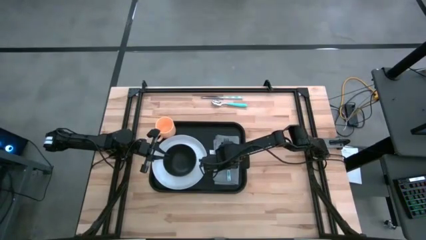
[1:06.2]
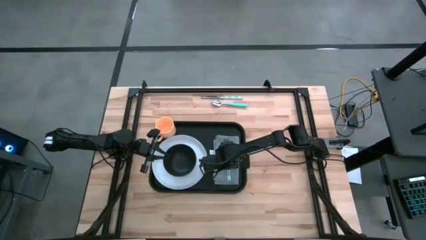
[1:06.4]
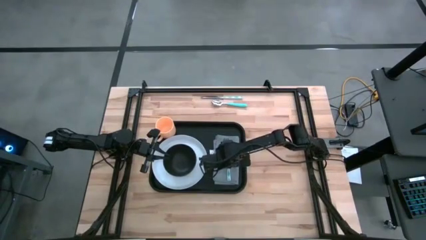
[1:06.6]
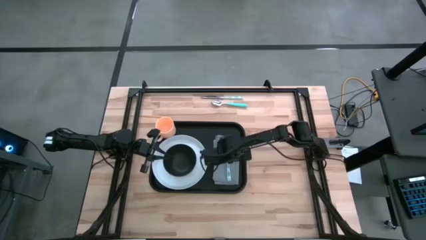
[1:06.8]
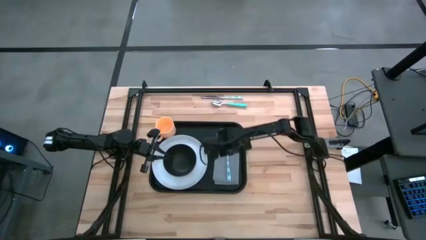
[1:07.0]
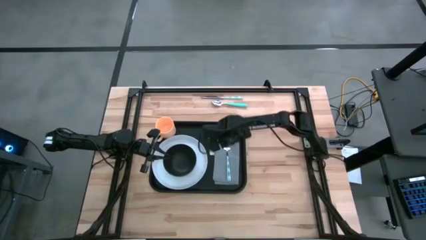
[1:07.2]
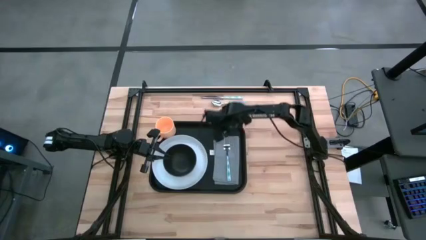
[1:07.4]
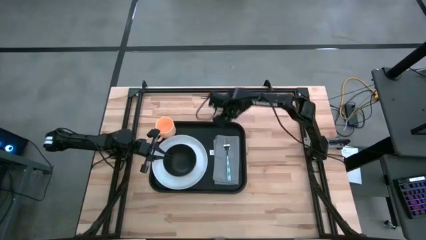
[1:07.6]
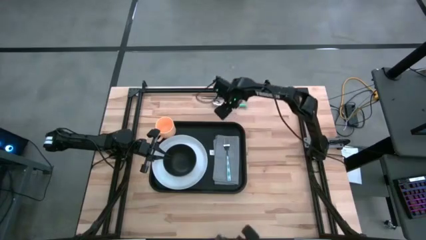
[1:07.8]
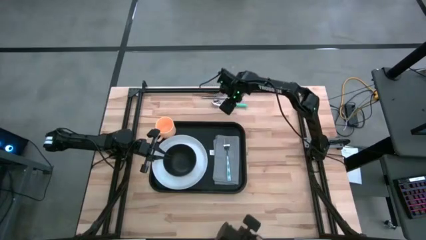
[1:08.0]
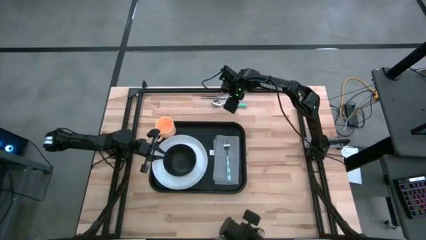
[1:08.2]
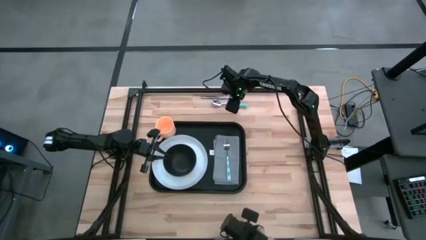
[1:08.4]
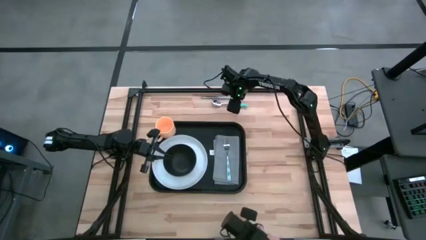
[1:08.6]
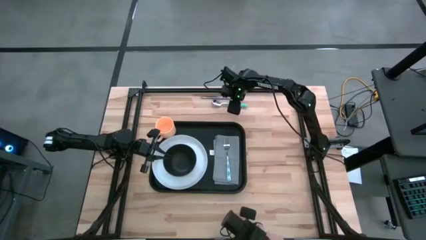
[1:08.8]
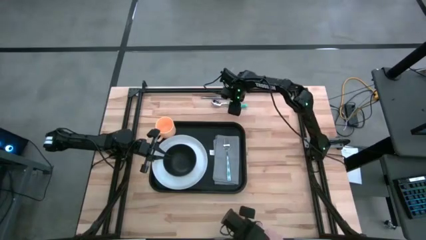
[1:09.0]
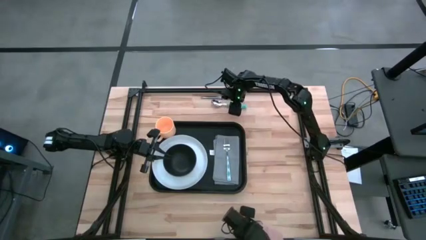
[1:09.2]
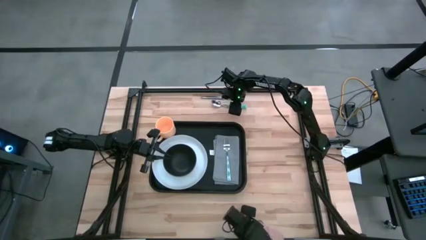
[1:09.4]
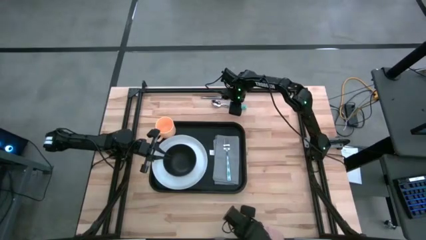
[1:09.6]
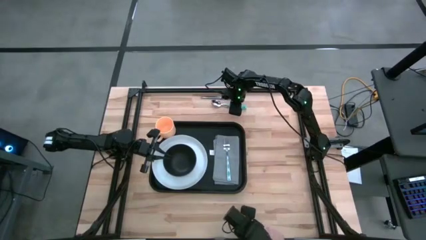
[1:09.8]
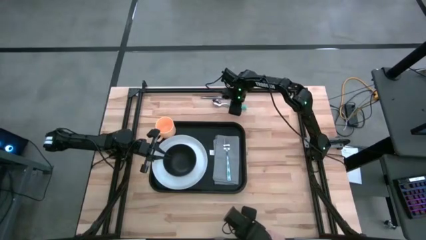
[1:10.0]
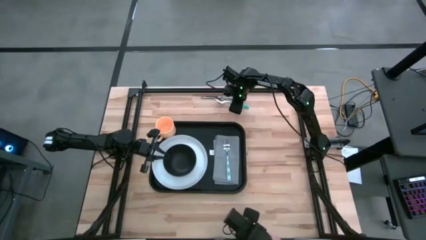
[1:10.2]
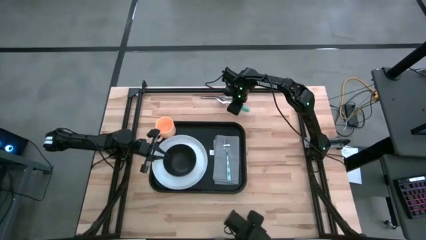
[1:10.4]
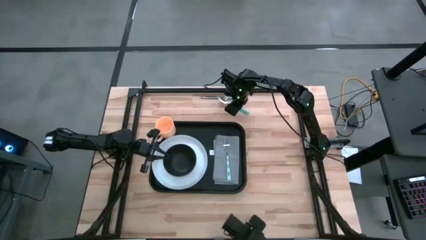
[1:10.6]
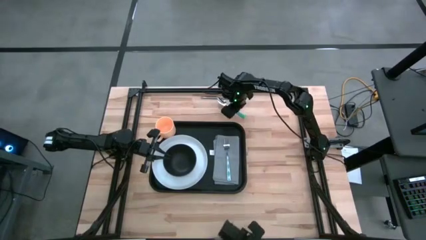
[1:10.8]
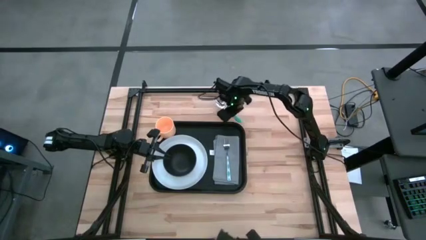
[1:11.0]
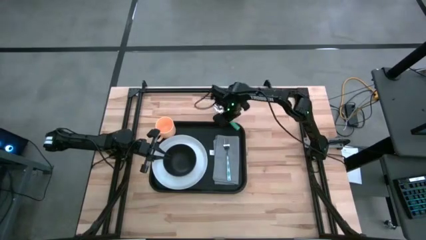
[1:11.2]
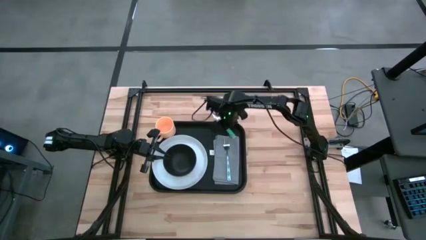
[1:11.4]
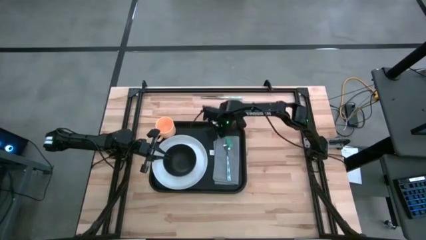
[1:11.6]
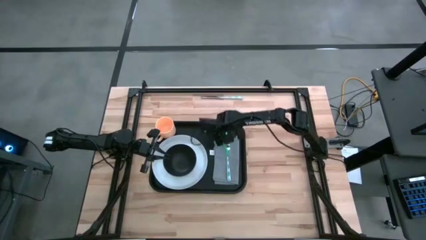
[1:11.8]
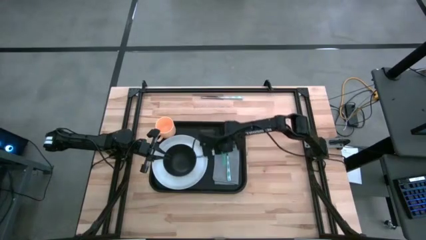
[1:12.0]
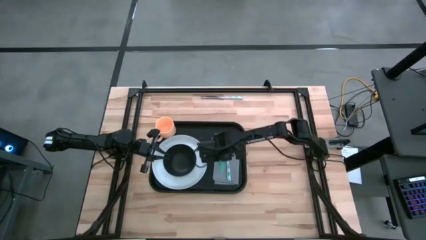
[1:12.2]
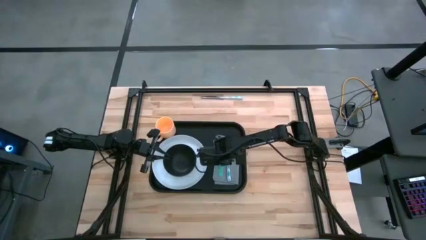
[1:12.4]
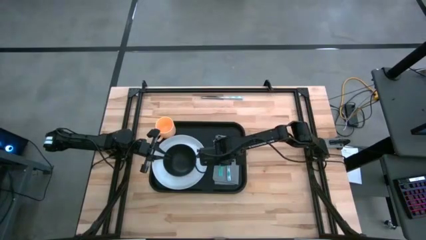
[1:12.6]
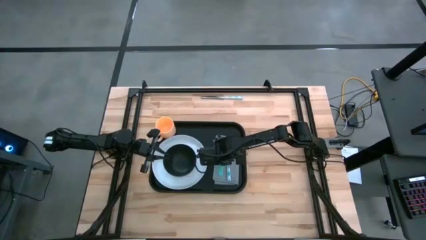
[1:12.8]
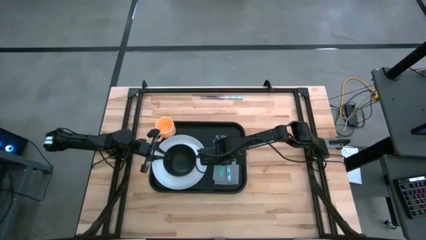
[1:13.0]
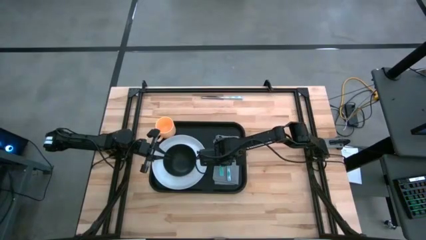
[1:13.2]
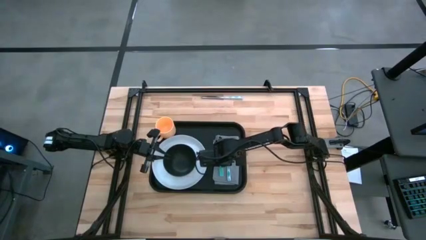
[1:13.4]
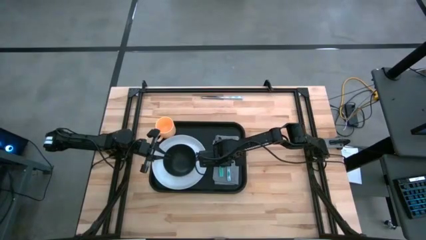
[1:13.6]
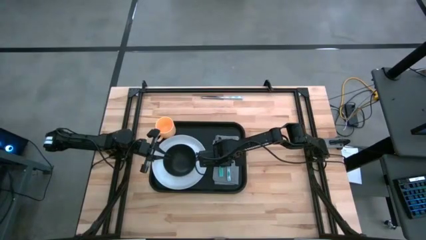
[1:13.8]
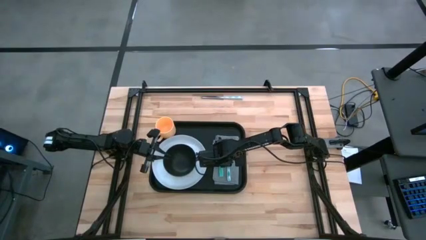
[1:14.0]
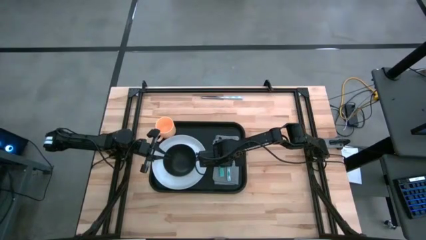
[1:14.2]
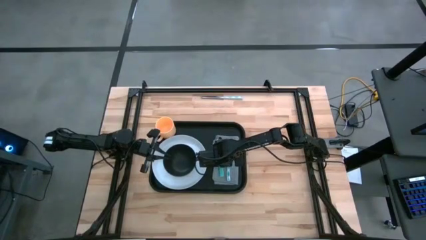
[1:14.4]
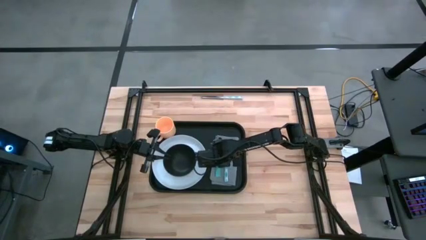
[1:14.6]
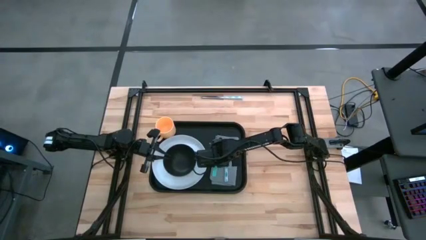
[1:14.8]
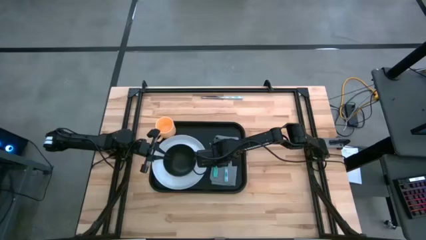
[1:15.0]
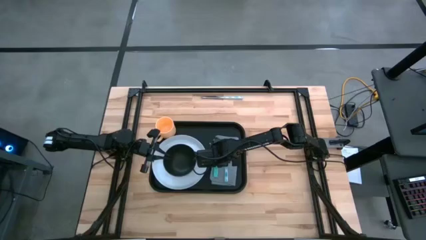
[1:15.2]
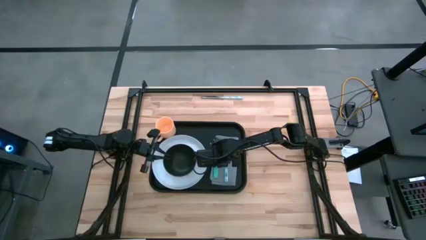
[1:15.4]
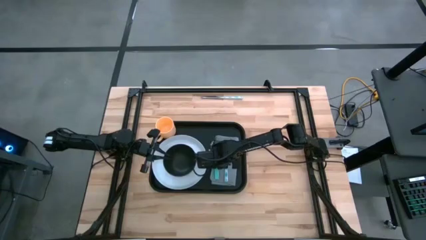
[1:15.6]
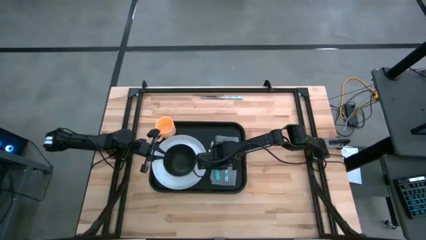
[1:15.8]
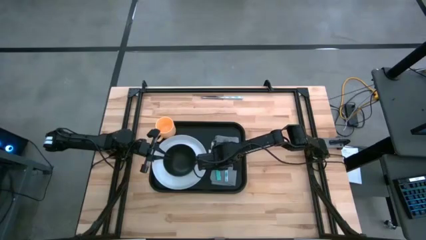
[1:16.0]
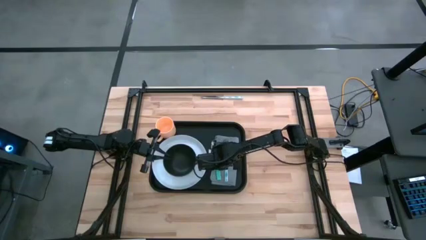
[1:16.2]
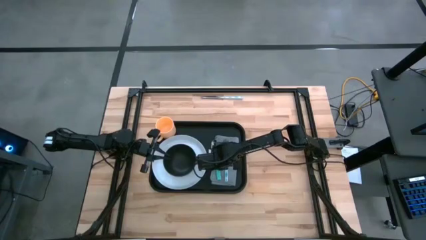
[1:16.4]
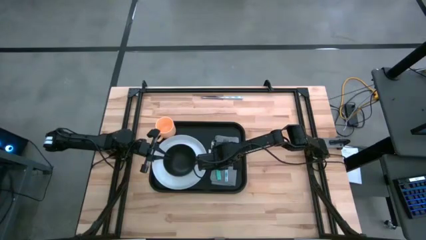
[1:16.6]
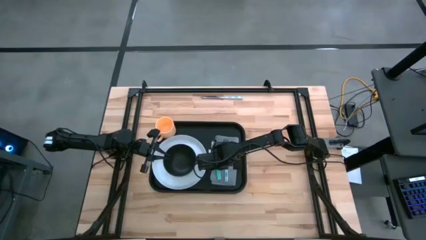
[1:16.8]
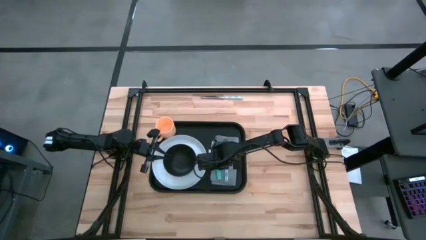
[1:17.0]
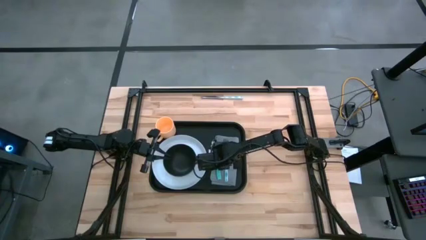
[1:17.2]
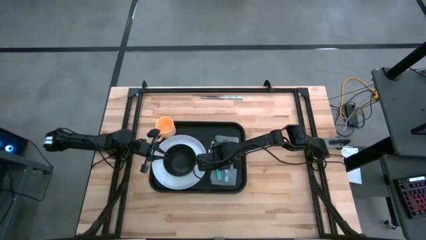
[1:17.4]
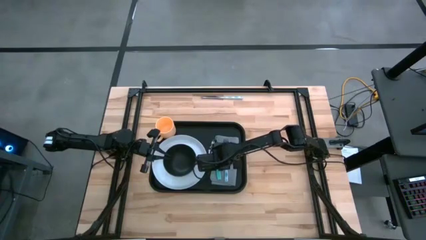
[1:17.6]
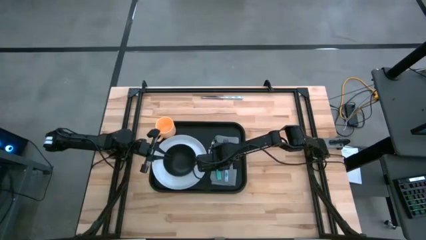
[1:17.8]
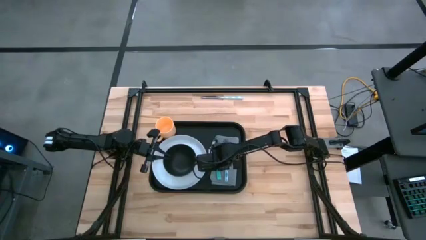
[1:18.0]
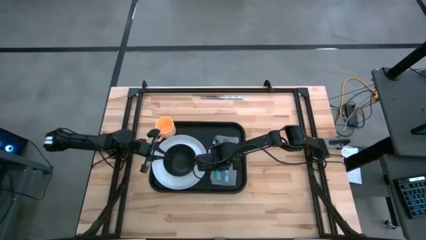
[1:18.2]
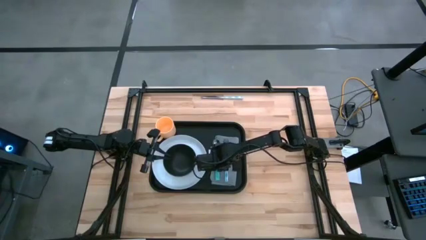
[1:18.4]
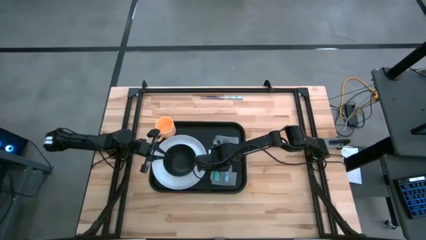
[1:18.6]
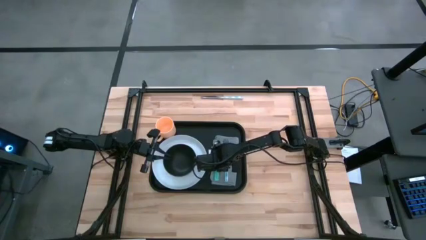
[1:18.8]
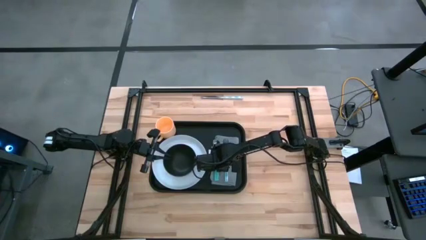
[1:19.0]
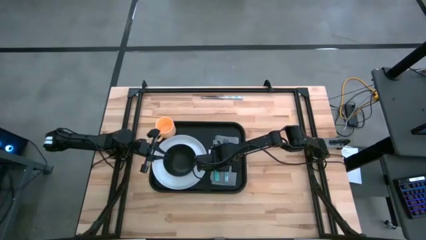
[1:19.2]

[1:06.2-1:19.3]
Task: Set up tray
Put the green spoon to the right of the white plate on the gray napkin on the black tray
